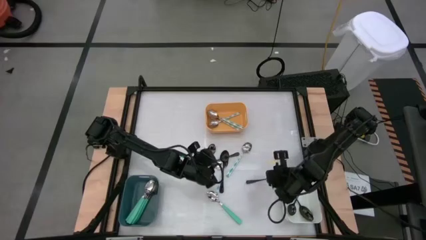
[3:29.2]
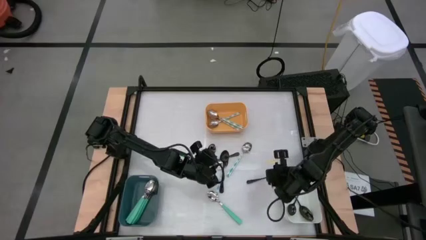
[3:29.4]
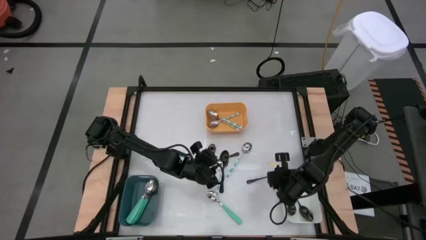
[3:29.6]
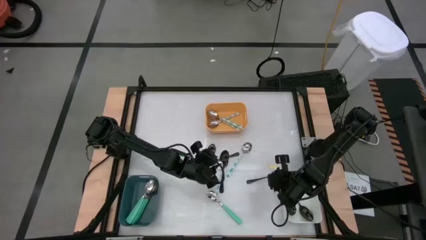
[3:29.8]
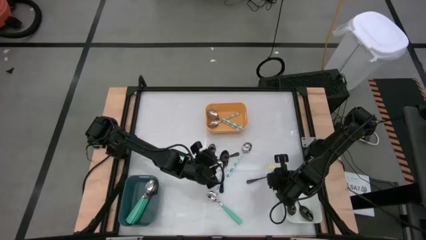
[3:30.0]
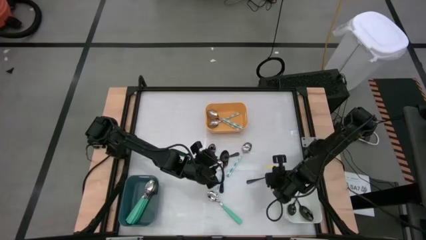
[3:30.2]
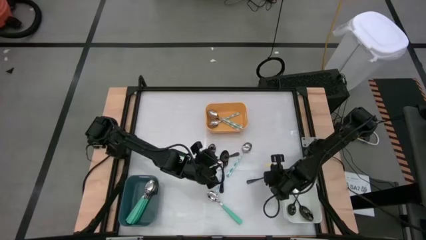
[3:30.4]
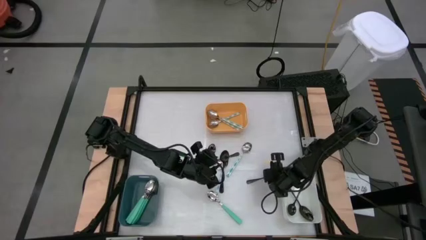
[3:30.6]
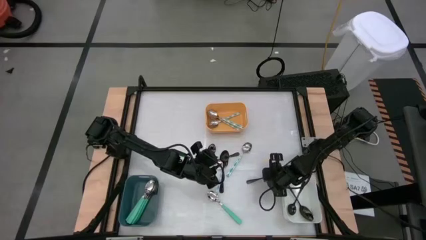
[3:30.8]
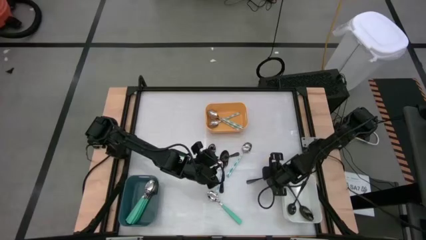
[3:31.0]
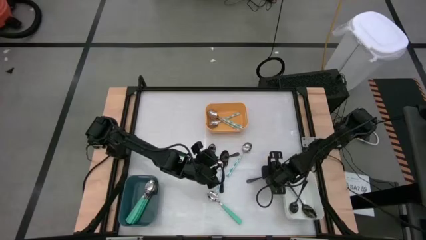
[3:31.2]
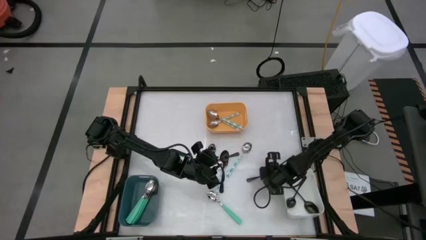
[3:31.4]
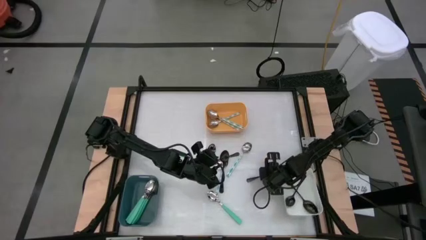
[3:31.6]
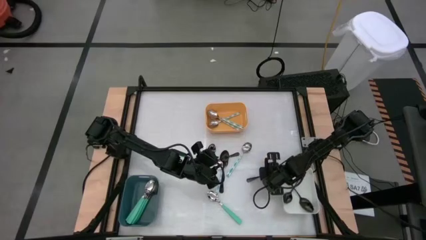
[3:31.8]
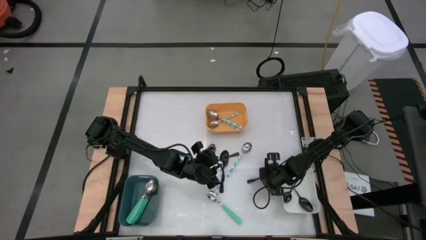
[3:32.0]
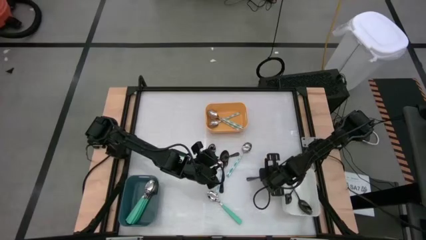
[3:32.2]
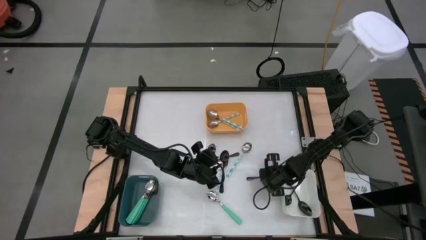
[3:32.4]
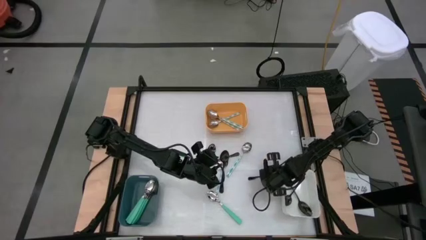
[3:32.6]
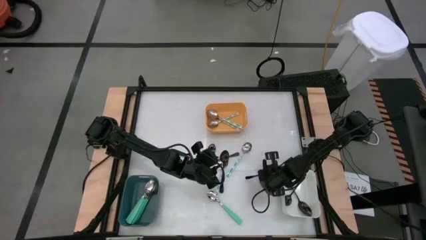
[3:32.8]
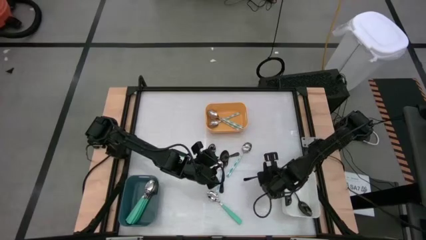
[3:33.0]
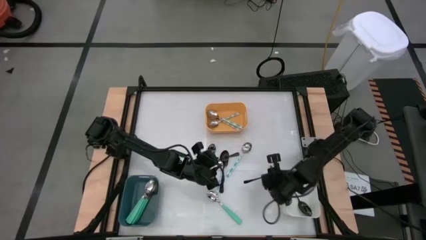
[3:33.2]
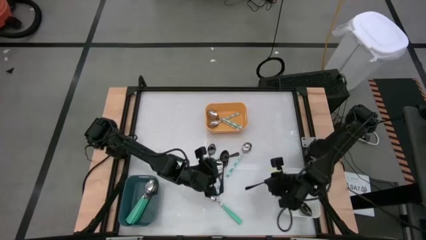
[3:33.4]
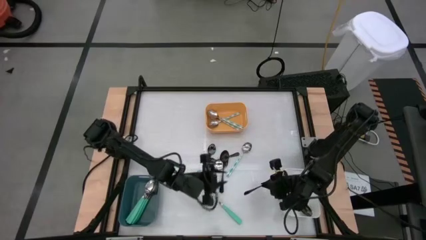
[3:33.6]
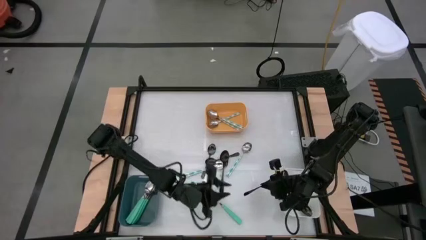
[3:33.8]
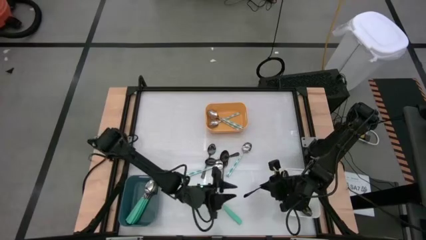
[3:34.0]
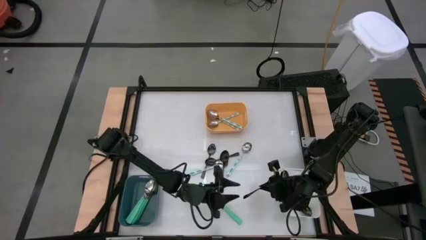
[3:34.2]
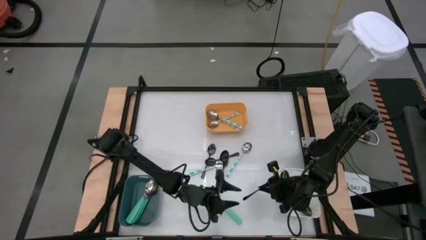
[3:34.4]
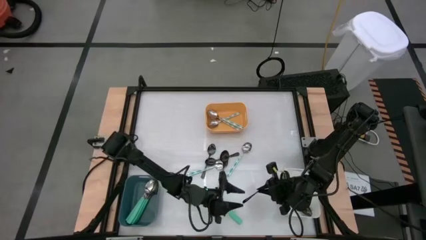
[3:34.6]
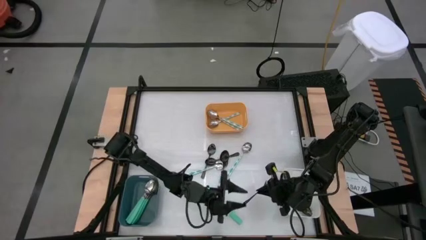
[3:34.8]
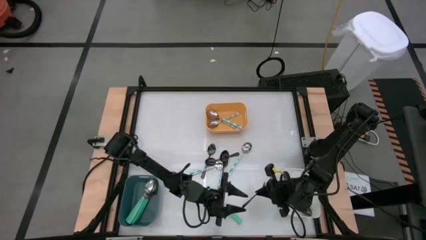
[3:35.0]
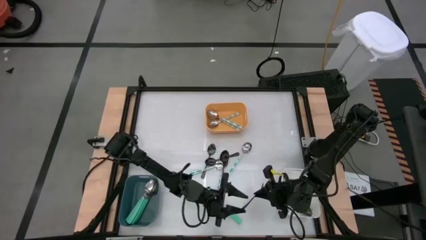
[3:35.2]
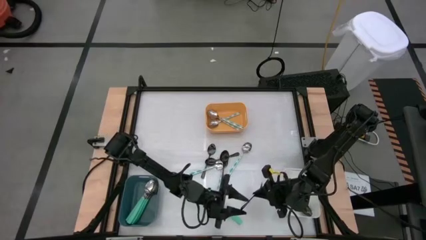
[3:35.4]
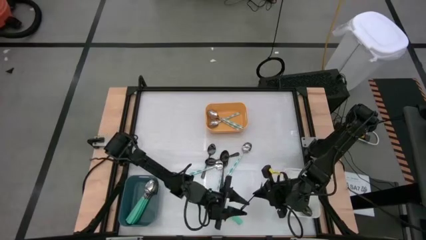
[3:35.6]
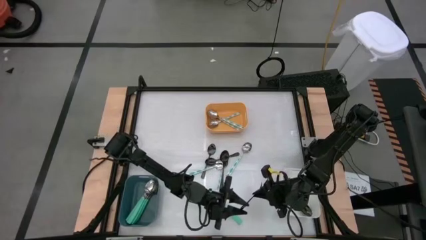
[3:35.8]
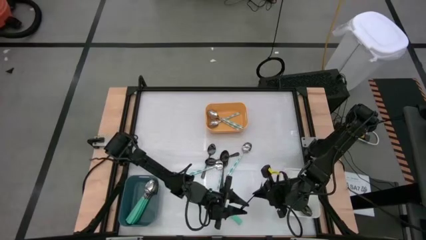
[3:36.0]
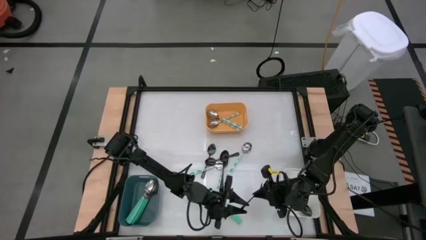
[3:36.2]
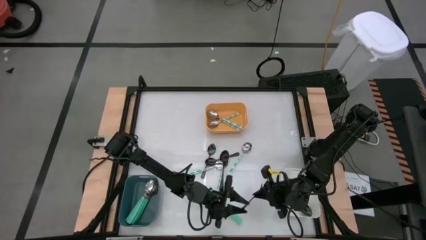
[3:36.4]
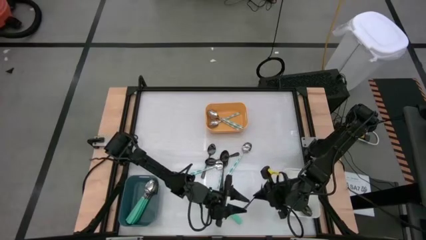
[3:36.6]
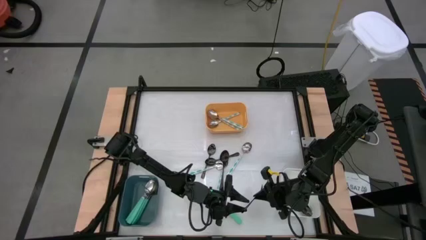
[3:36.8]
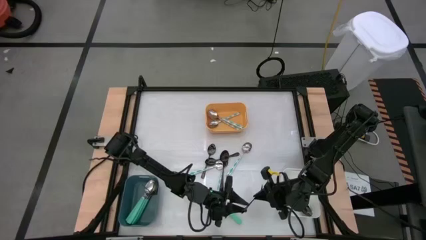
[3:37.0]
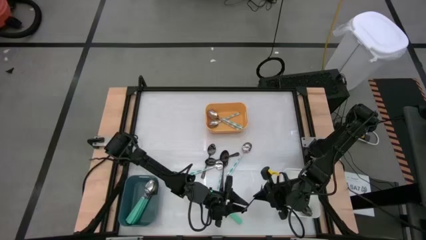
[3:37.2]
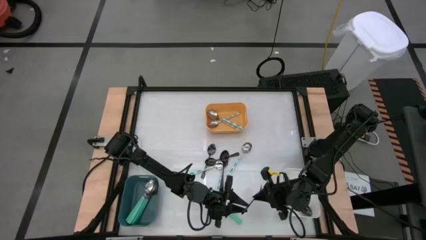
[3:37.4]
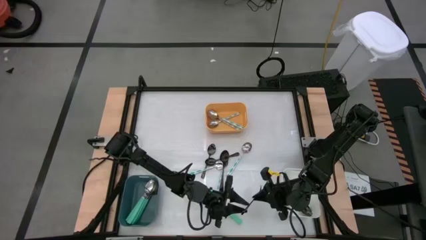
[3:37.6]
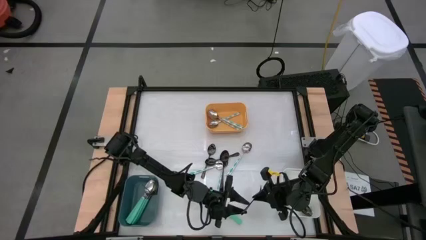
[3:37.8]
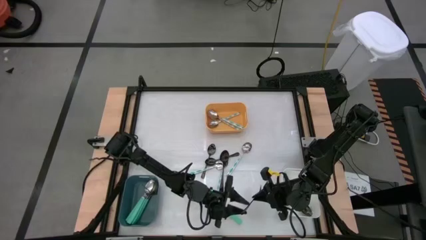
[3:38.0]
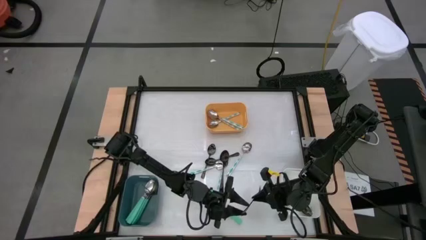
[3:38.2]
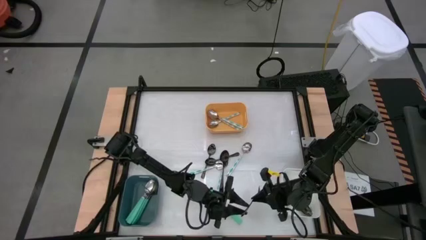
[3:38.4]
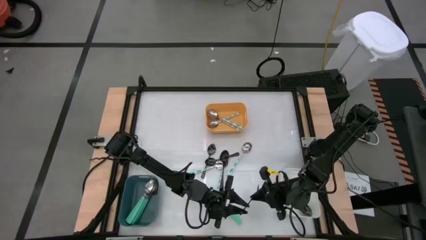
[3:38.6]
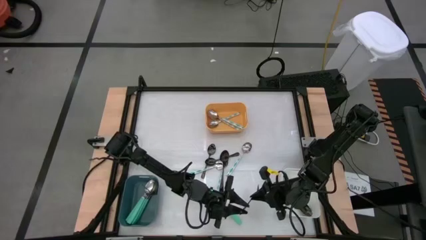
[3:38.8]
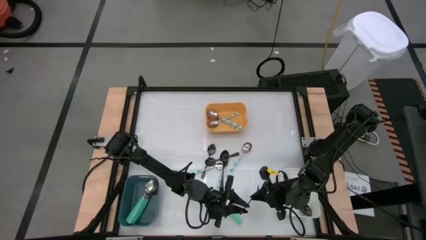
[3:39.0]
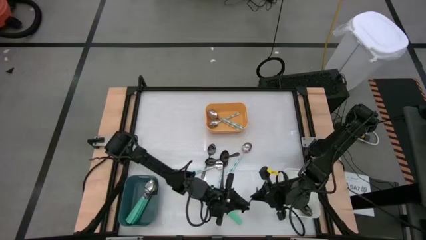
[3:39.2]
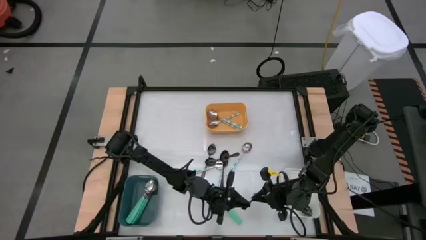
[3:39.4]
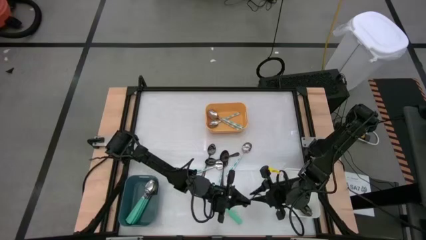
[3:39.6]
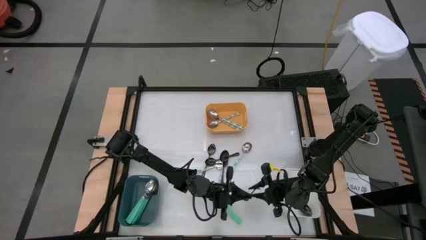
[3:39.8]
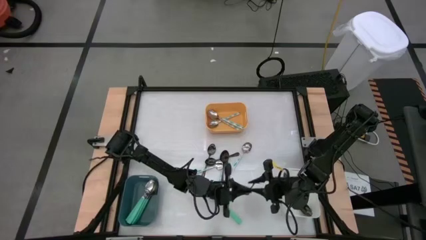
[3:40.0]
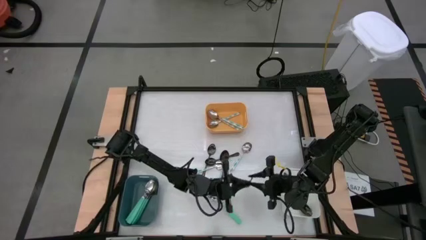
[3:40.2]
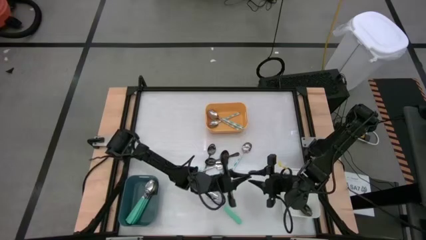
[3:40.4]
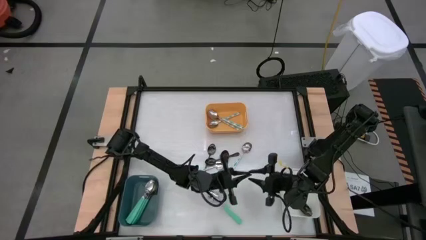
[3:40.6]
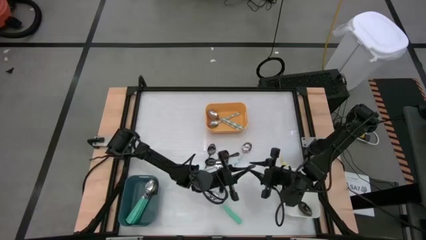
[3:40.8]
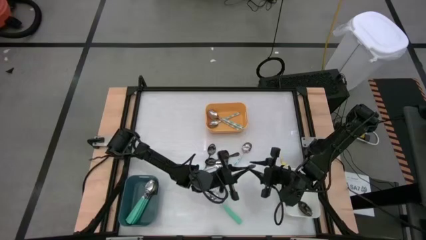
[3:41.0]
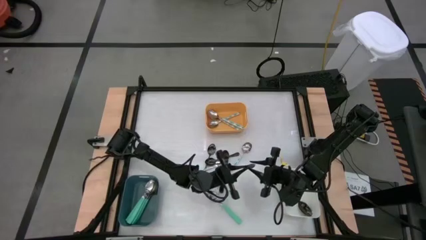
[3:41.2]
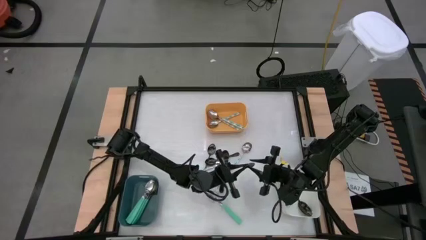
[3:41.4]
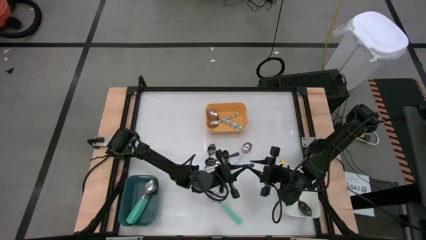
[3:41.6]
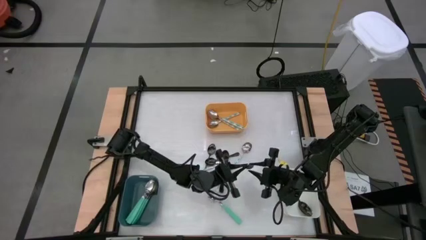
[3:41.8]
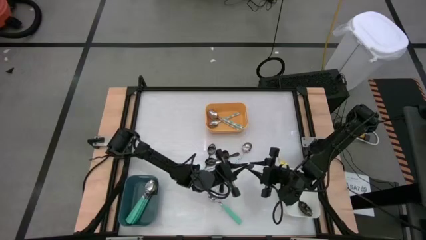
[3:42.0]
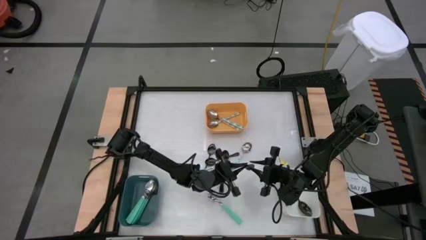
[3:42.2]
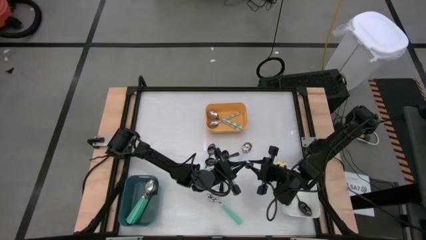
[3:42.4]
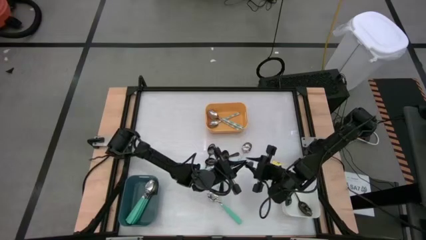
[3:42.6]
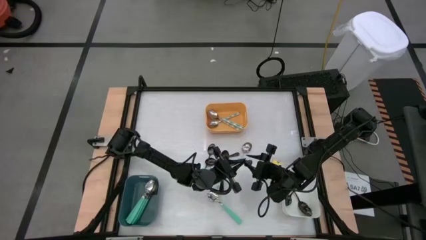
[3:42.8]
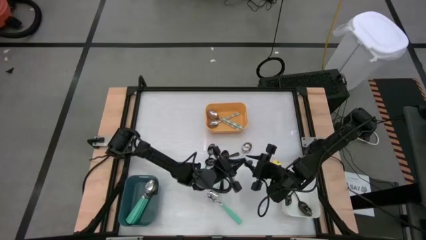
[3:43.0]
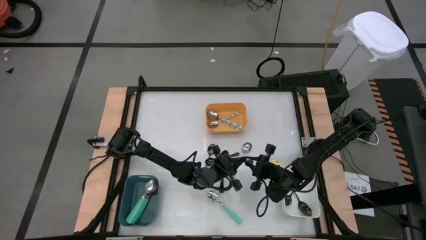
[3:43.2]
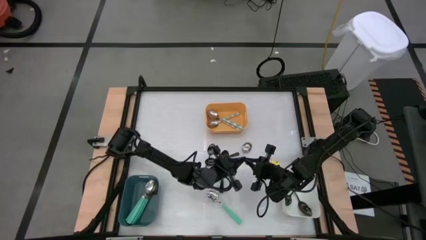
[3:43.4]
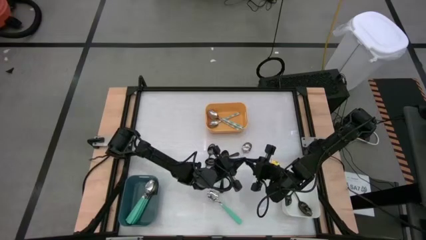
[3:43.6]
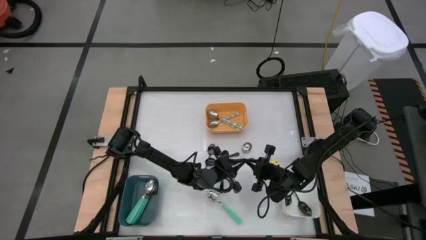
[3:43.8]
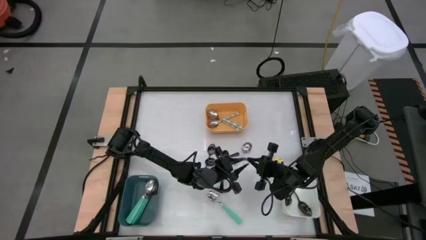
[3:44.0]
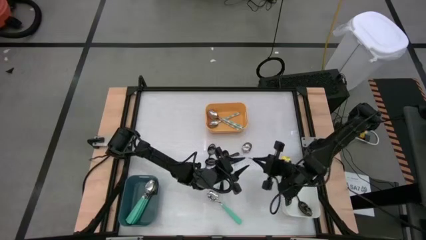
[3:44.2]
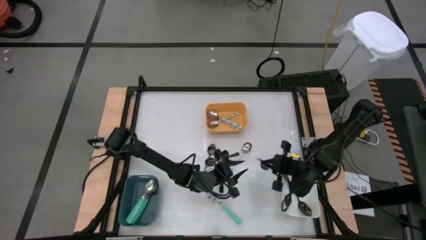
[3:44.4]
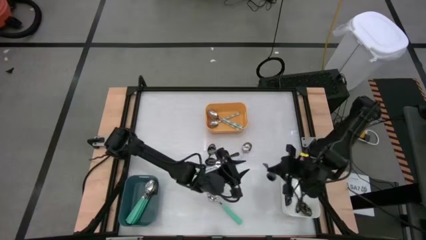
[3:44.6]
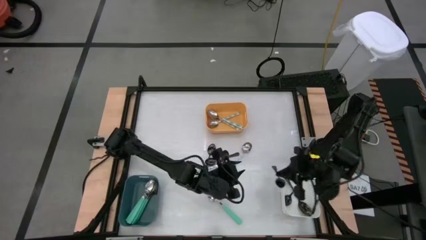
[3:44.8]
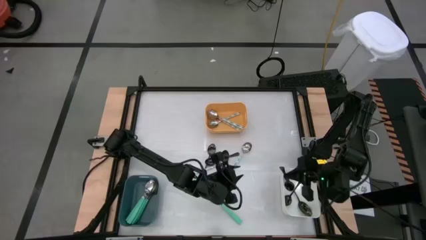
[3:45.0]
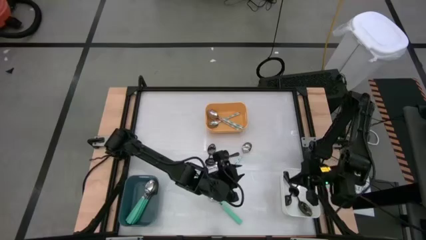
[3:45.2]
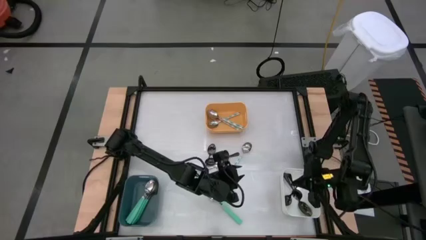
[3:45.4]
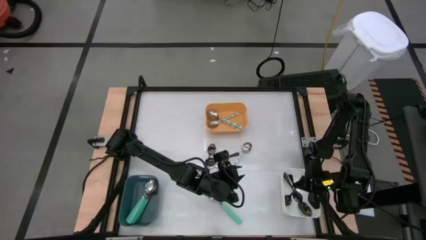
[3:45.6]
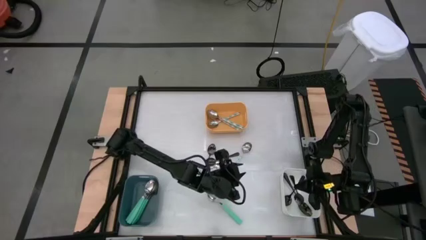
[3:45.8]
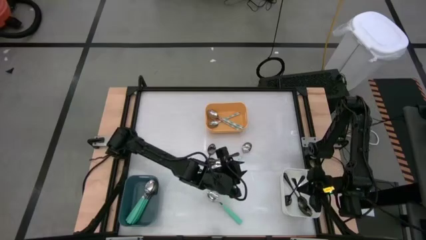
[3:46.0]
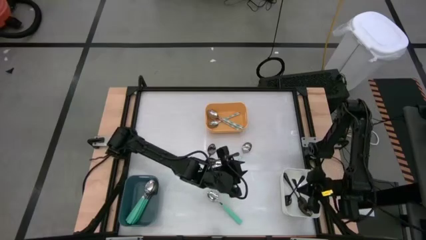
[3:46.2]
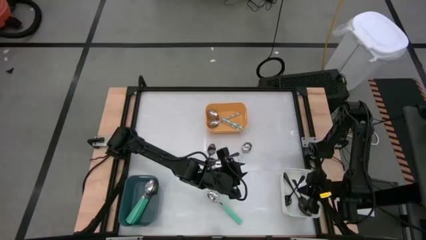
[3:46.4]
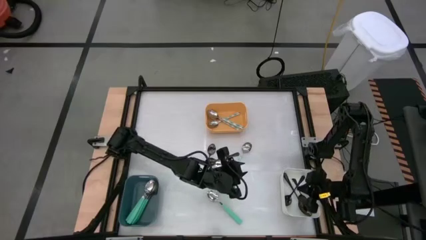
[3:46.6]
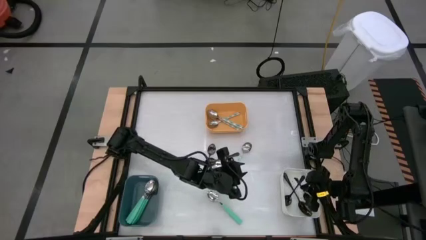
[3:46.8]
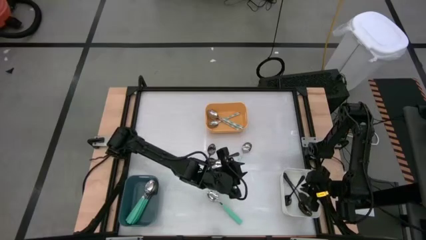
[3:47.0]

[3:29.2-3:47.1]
Task: Sort silverware by color (type)
Put the black spoon into the white bin
